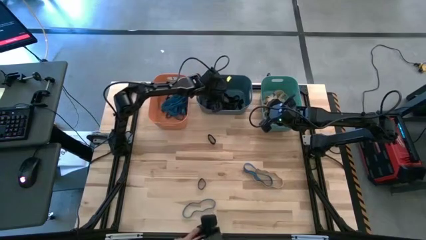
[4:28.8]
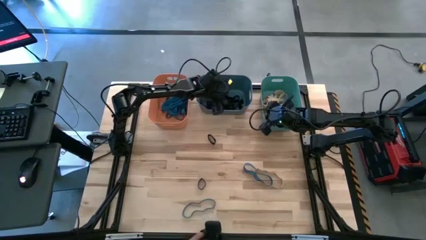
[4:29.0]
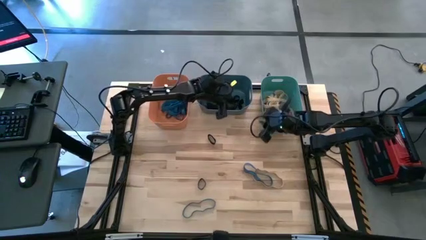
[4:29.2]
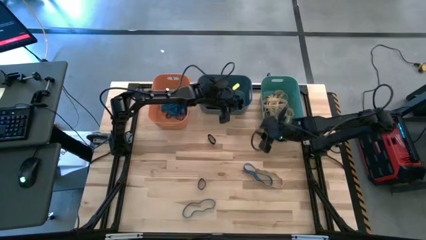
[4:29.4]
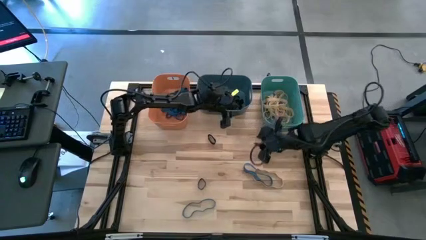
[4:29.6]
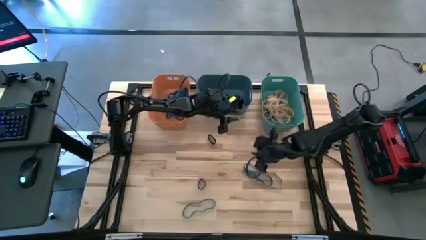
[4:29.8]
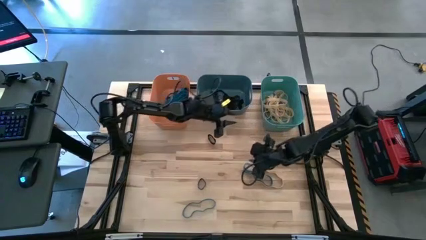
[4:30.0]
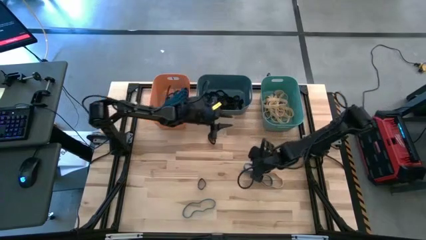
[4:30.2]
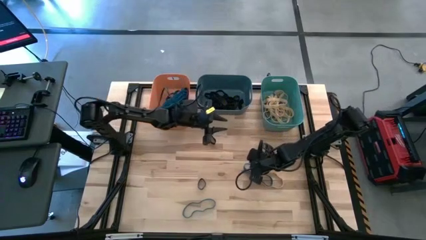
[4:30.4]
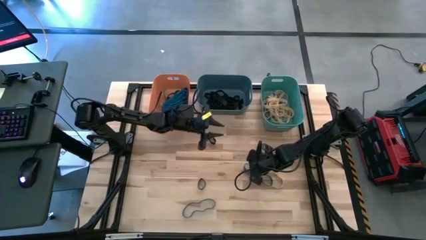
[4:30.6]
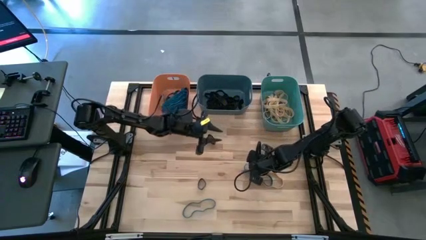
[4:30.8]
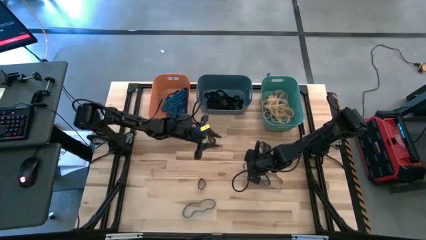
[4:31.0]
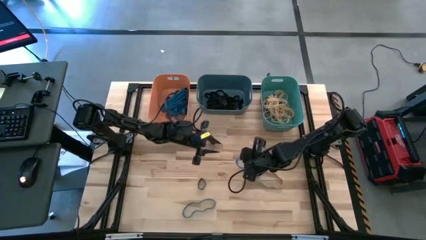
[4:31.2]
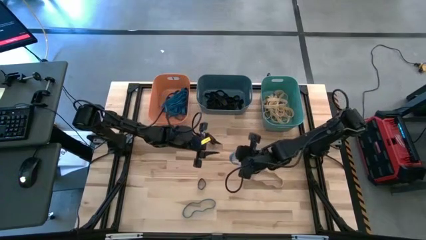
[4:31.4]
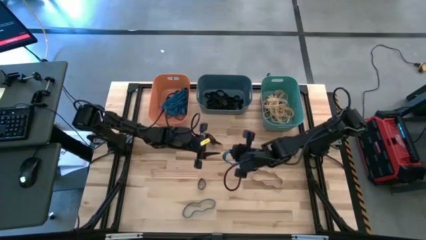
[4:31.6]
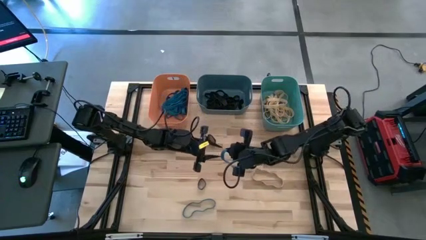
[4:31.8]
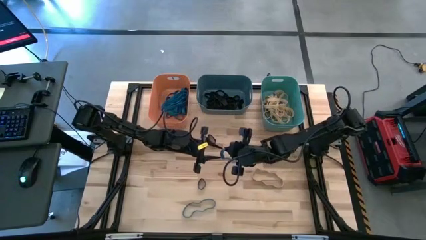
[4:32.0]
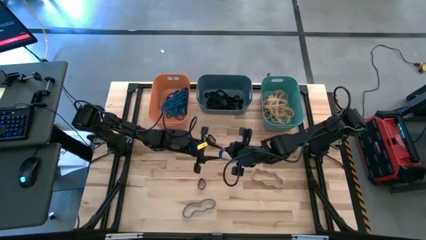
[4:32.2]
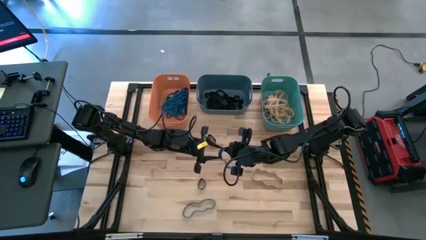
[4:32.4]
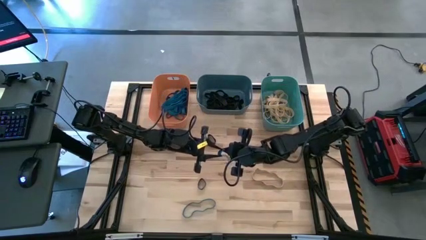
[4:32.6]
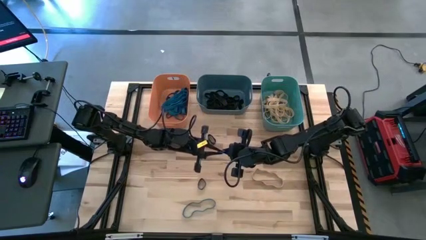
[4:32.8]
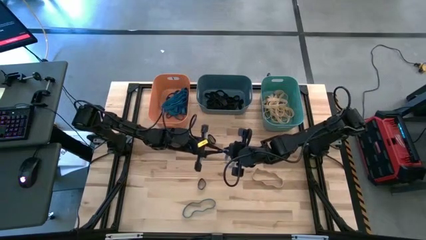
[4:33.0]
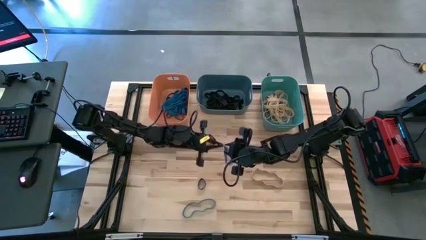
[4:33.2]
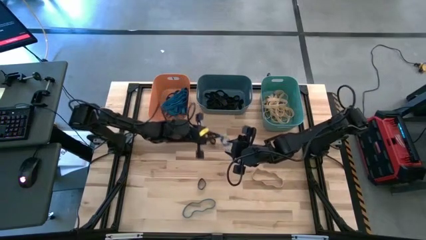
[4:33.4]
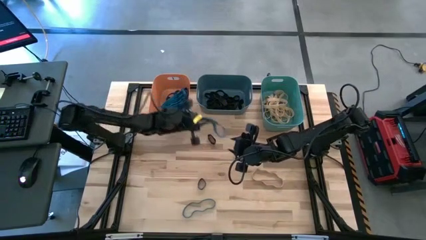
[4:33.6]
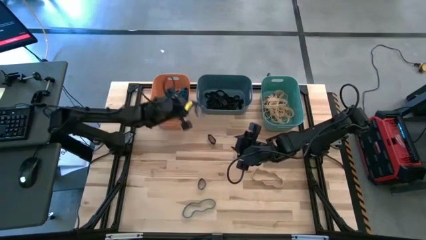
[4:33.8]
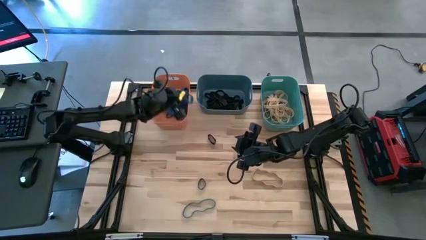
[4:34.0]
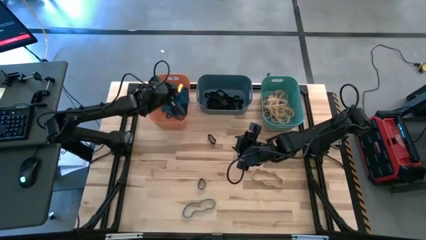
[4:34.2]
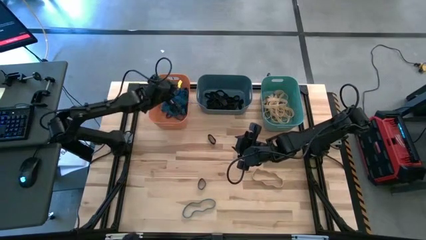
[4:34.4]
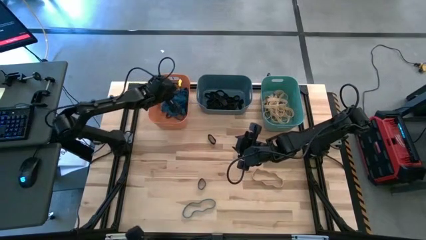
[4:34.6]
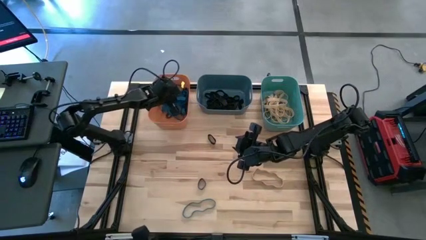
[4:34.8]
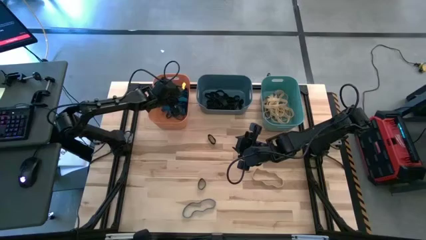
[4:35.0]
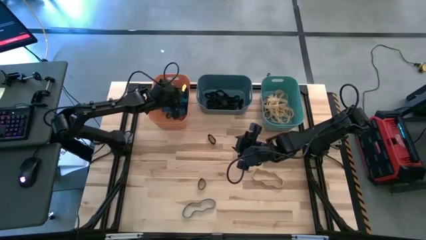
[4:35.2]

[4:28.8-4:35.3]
Task: Sort rubber bands into baskets
Put the blue rubber band into the orange bin

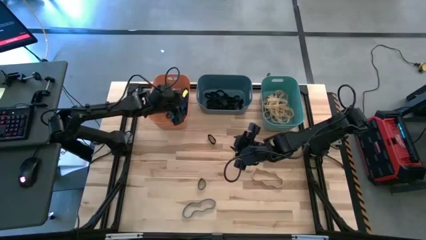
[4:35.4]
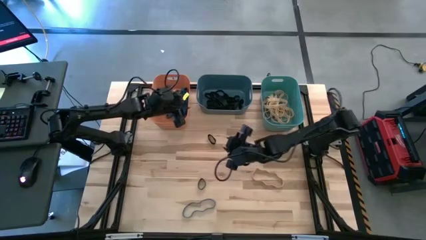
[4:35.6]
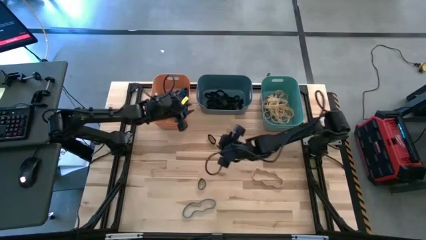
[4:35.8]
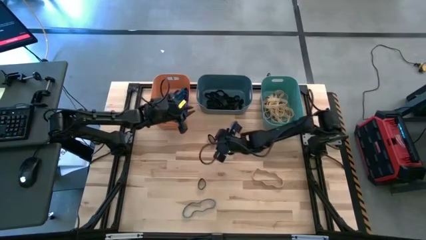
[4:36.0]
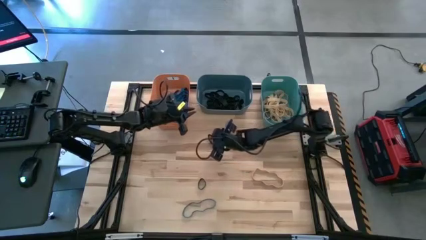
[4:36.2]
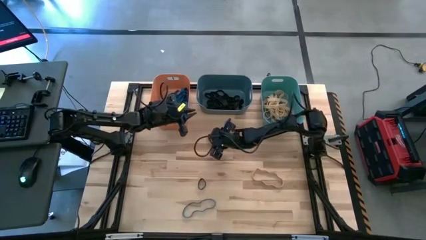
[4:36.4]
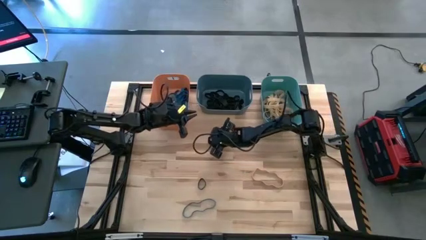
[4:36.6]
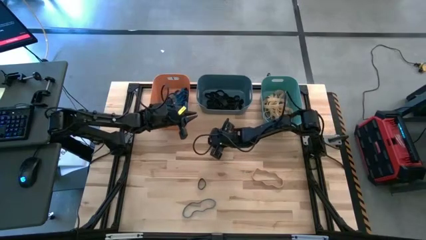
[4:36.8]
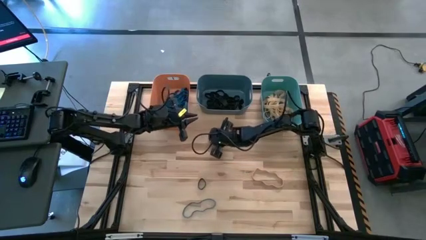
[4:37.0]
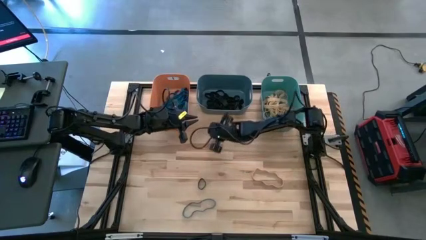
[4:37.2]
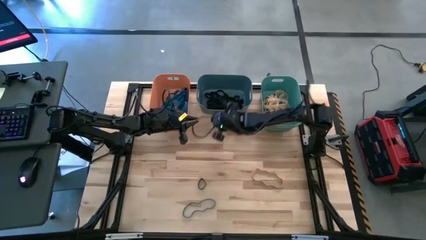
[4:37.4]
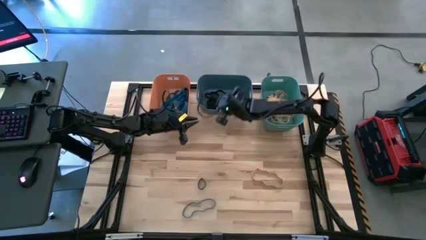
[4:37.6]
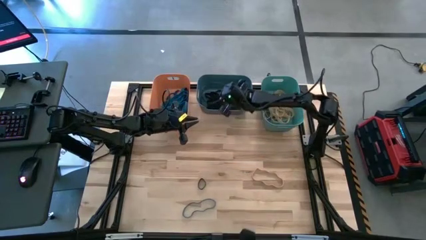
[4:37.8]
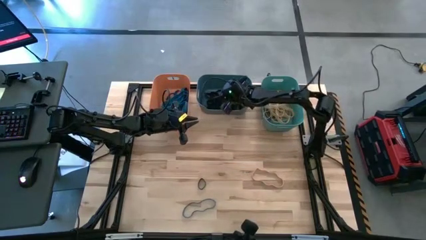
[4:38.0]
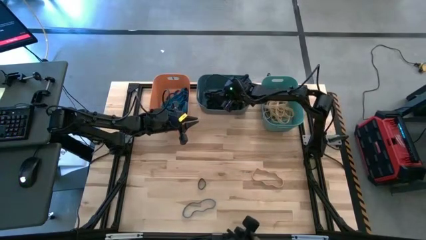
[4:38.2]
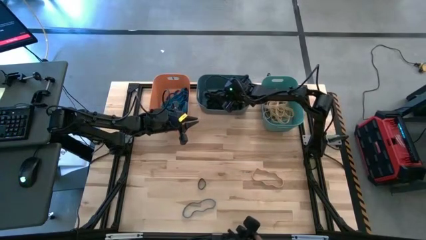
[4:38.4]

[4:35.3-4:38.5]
Put the black rubber band into the blue bin

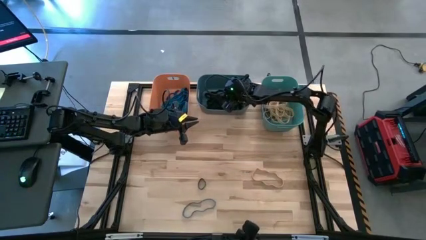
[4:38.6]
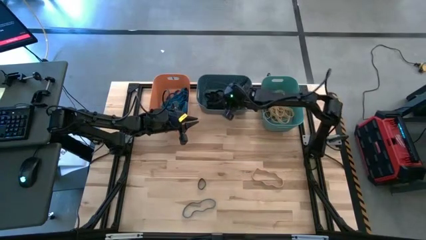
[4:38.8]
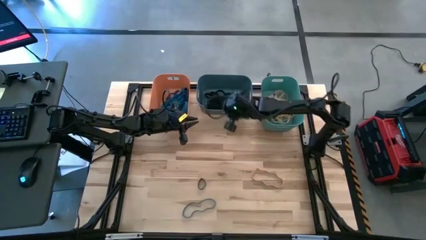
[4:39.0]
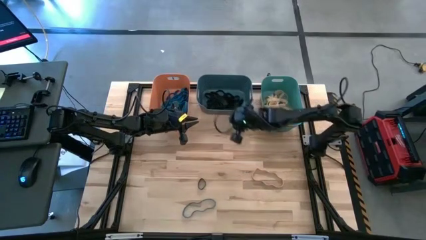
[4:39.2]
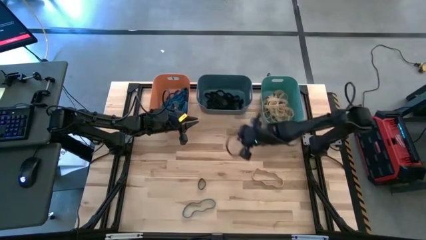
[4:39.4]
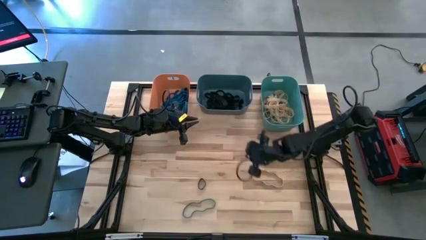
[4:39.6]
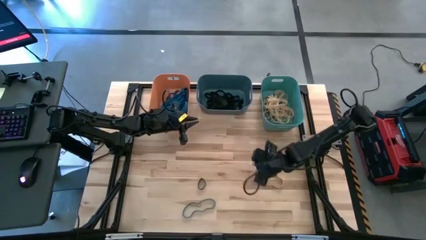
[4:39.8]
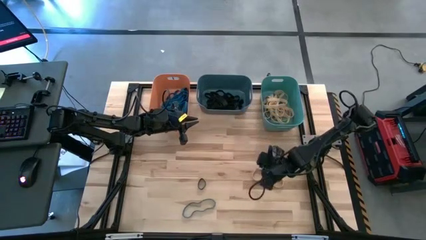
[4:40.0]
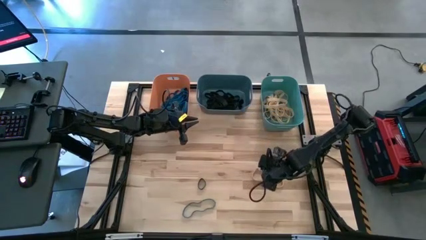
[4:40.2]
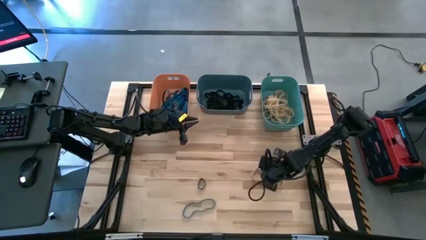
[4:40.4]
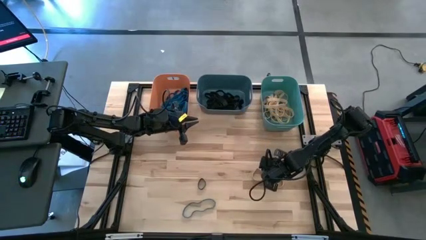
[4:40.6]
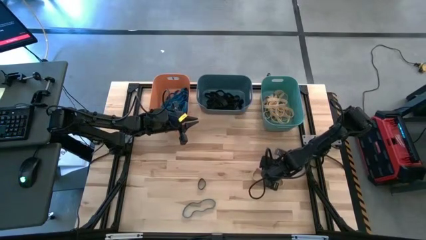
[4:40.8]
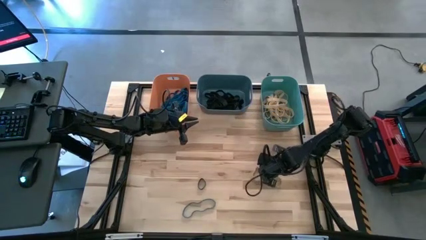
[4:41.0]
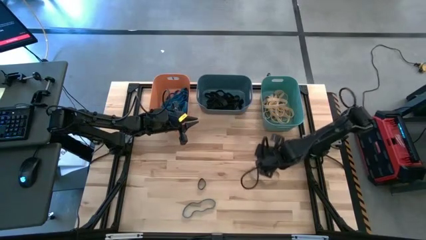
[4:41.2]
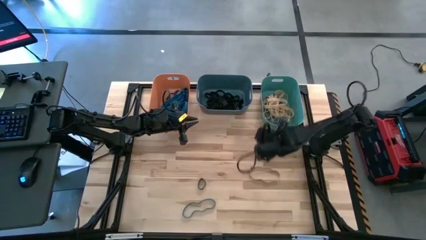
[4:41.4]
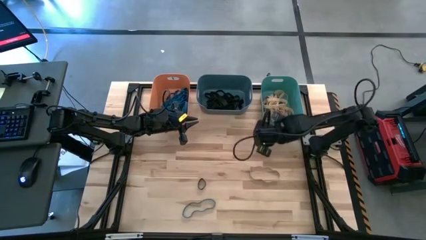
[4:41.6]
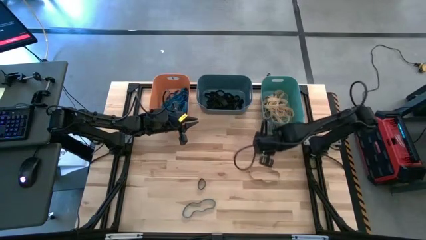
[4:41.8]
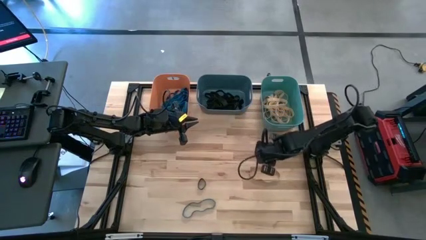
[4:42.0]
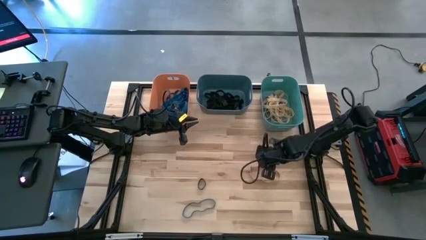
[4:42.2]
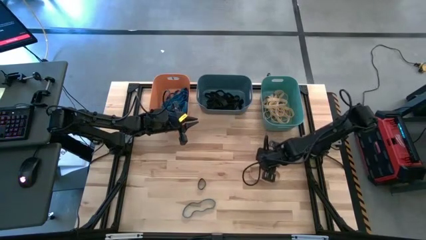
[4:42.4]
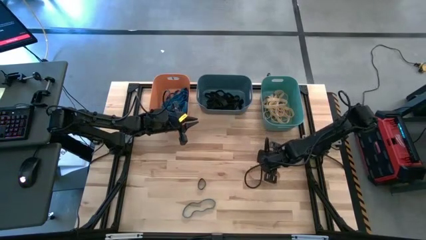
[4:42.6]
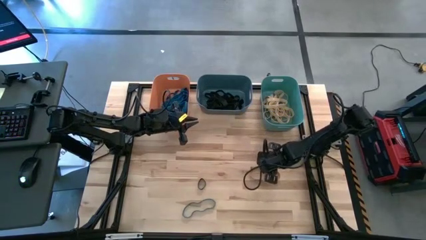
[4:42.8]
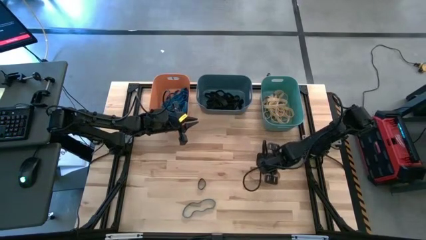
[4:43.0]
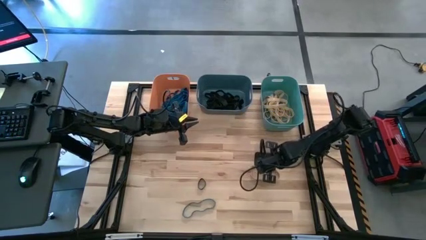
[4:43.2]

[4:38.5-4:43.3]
Put the brown rubber band into the green bin

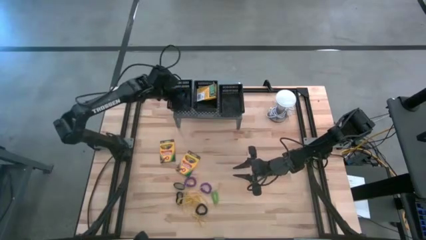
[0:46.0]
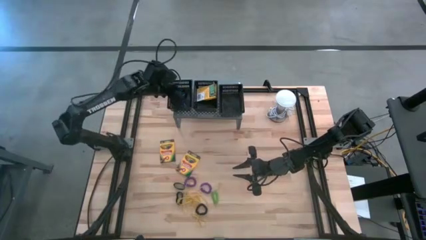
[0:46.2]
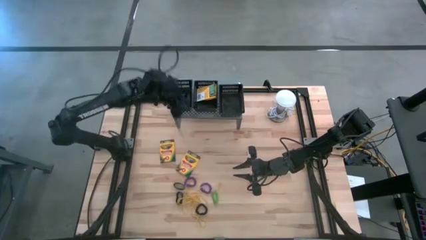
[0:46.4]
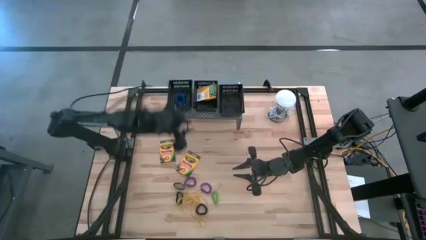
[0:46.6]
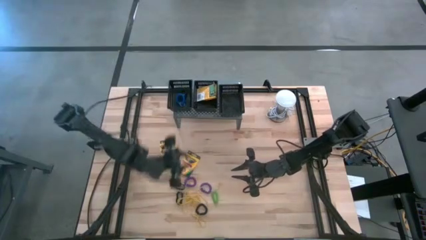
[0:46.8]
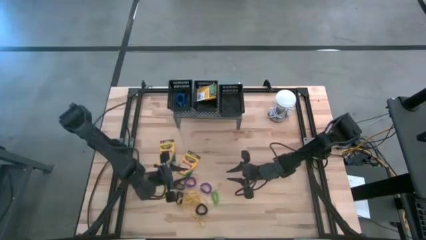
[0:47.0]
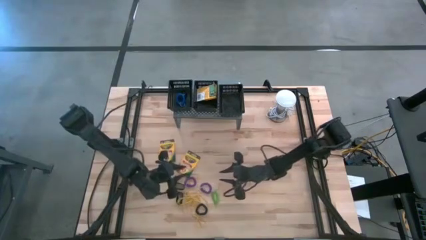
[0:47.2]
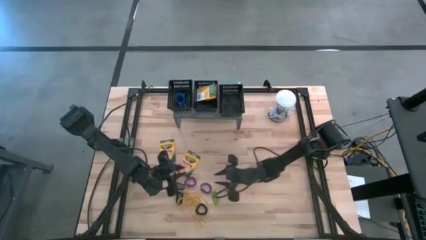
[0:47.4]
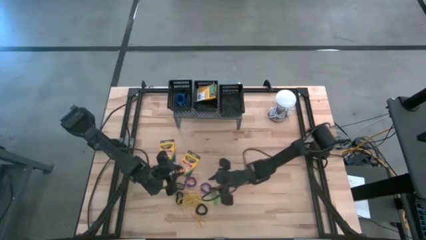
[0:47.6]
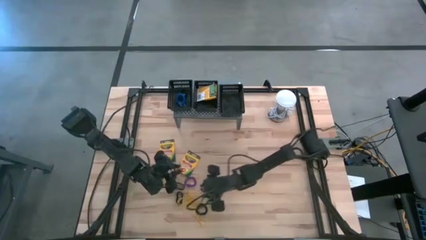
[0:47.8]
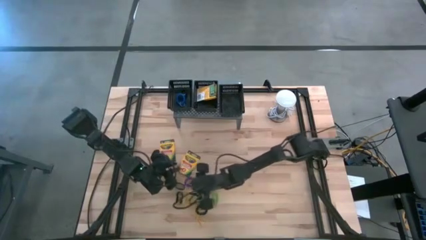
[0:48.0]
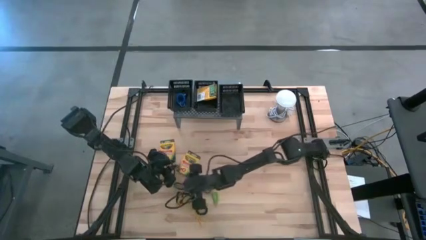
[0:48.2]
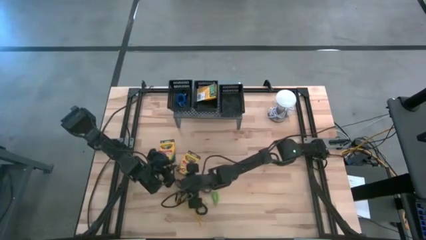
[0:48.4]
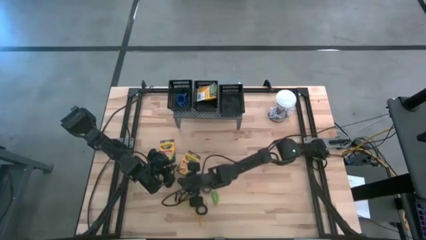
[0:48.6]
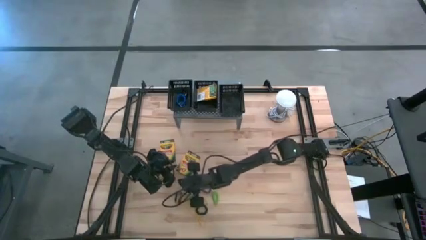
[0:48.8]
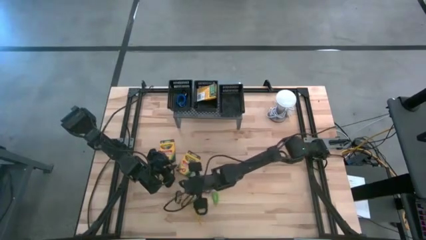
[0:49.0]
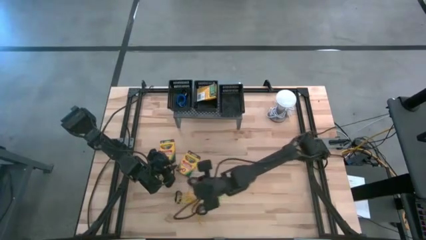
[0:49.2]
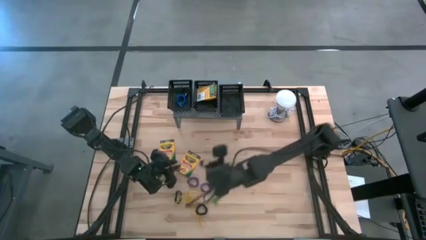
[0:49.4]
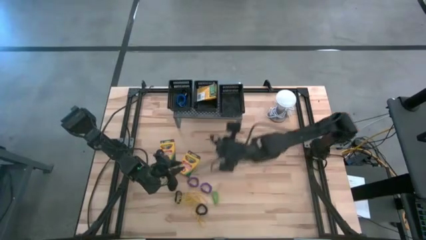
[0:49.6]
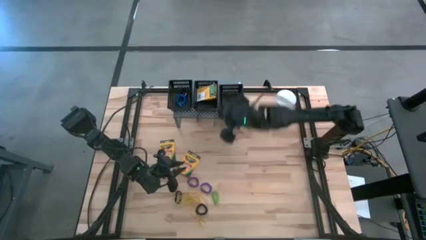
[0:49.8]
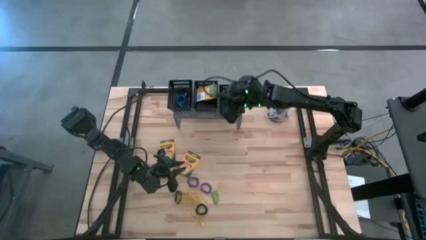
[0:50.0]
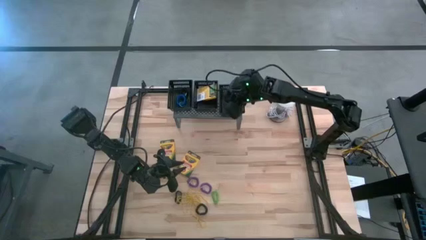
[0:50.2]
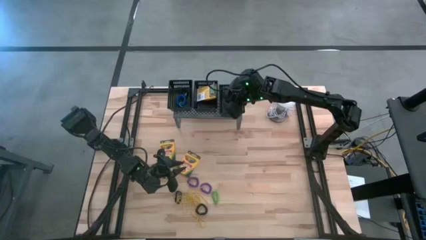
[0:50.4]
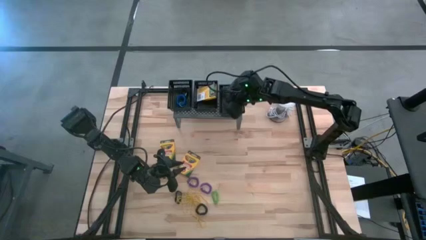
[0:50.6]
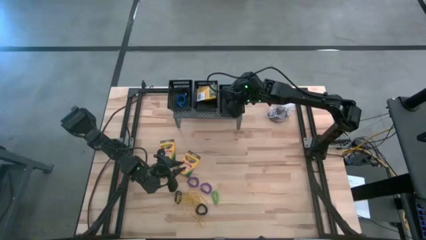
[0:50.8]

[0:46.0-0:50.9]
Task: Pick & Place Office Desk Supplies
Put the black rubber band into the right black bin on the shelf
